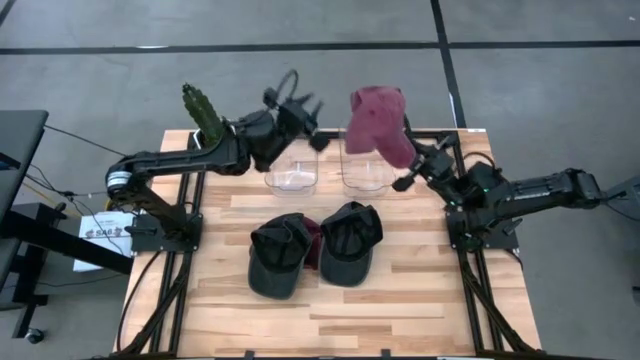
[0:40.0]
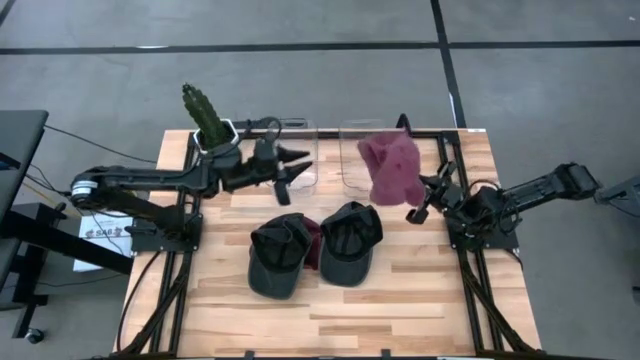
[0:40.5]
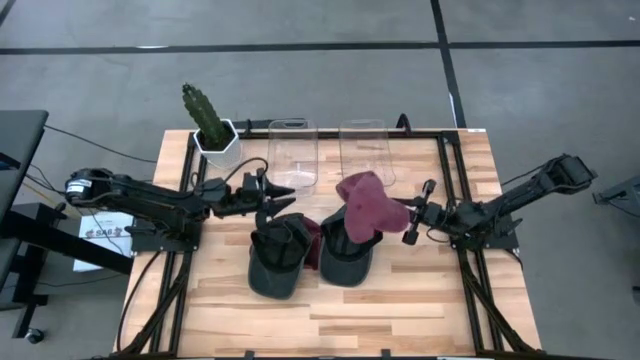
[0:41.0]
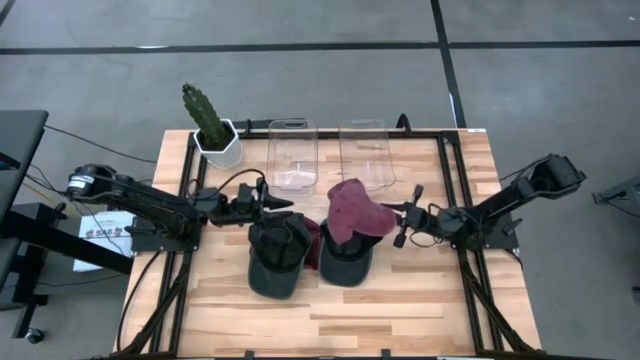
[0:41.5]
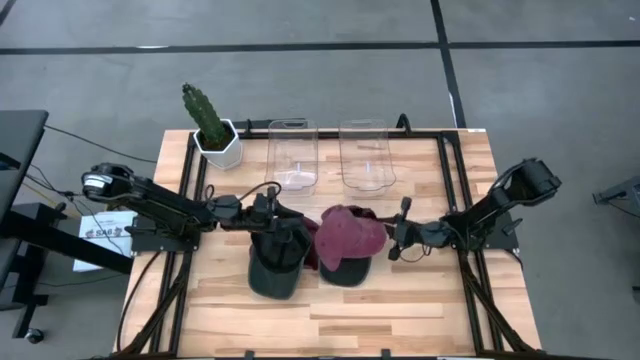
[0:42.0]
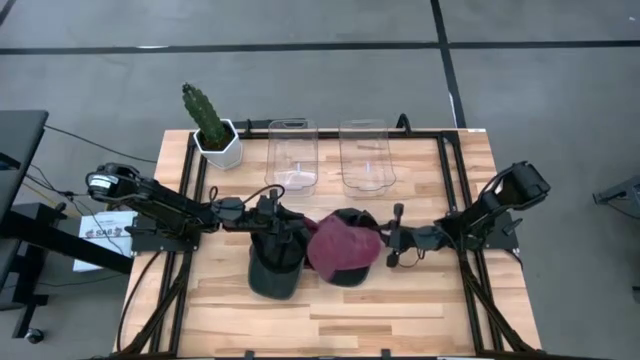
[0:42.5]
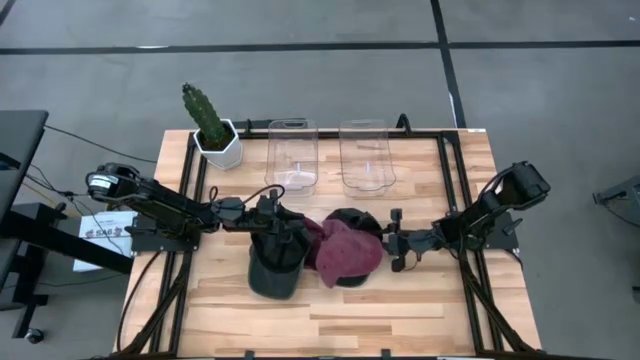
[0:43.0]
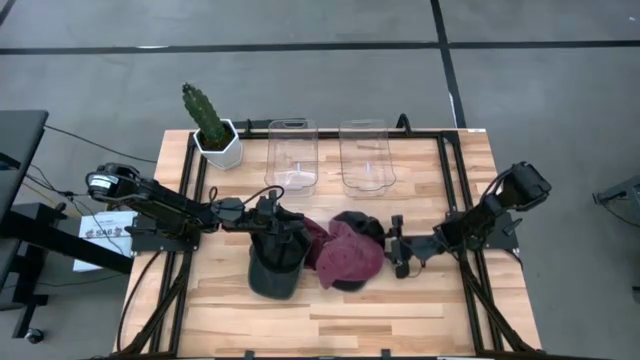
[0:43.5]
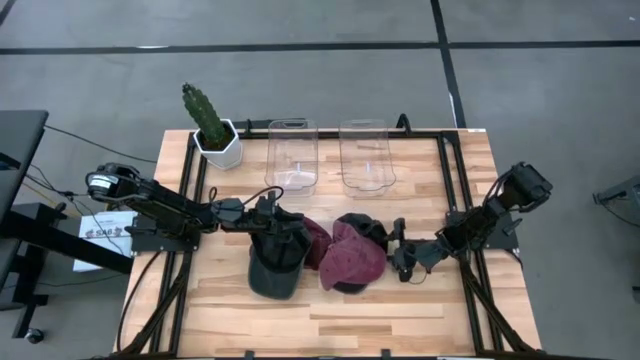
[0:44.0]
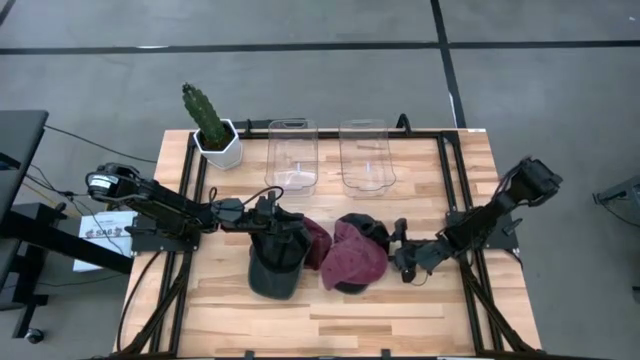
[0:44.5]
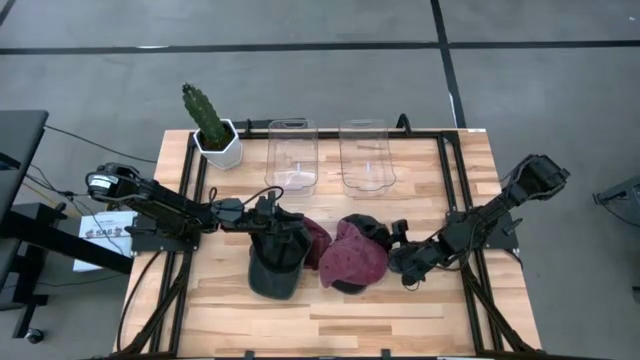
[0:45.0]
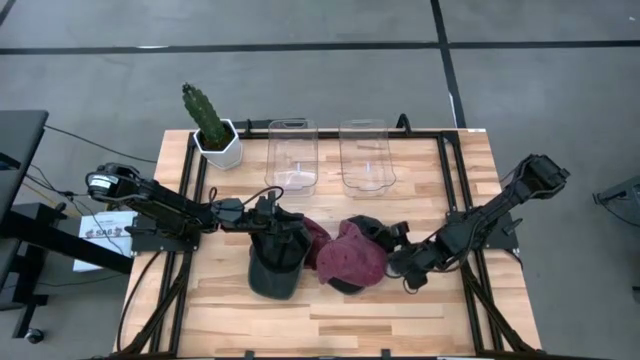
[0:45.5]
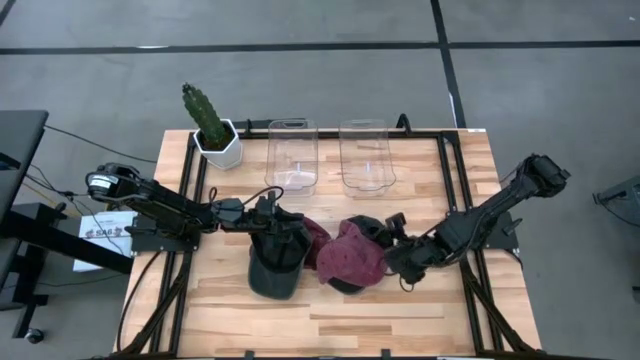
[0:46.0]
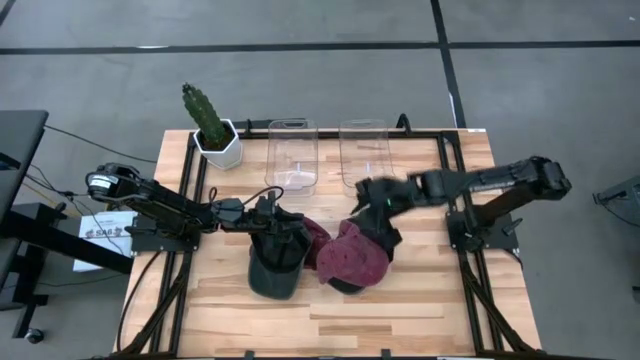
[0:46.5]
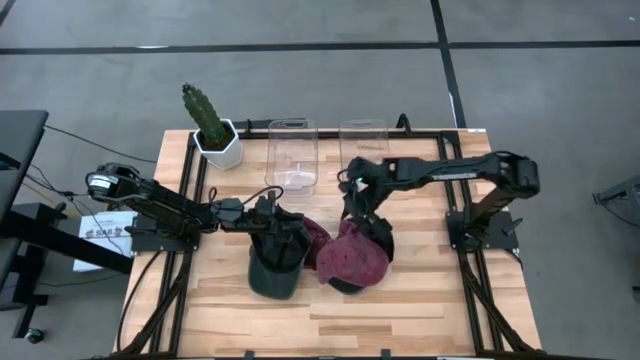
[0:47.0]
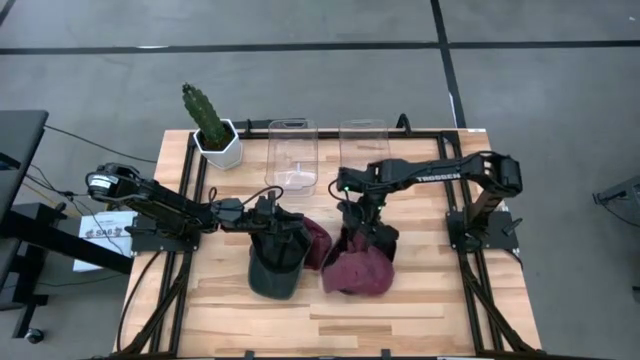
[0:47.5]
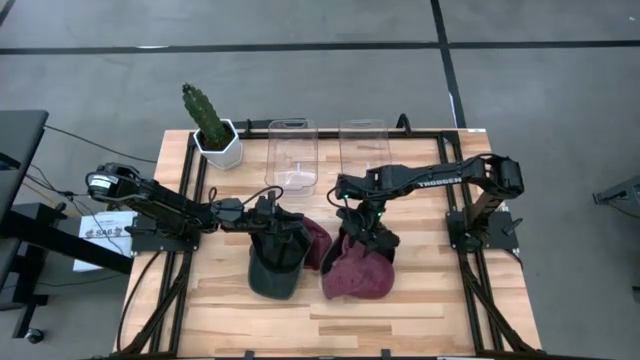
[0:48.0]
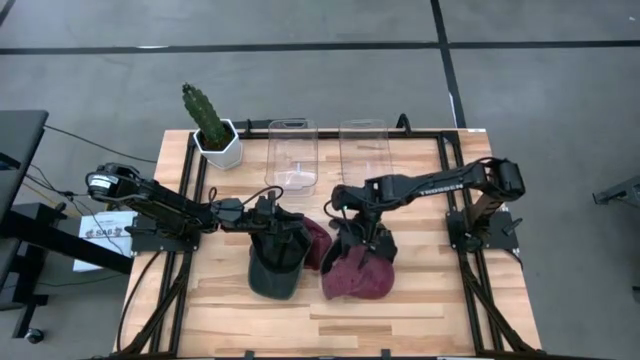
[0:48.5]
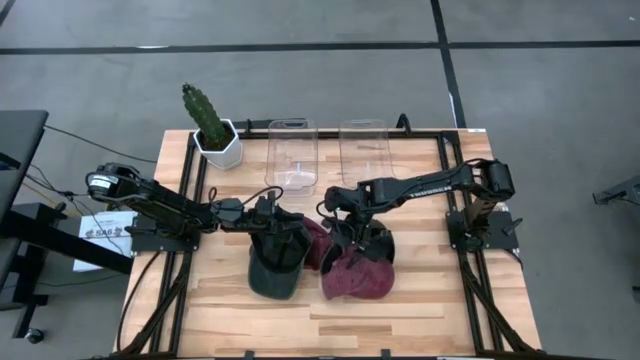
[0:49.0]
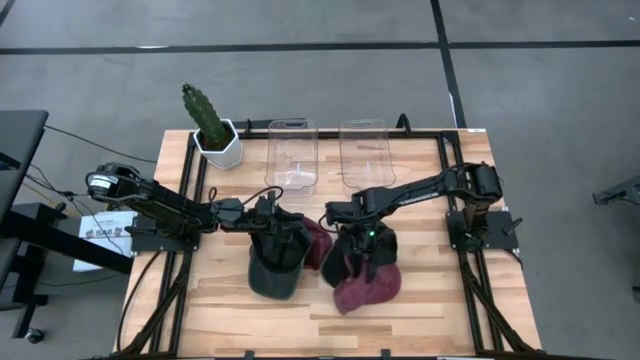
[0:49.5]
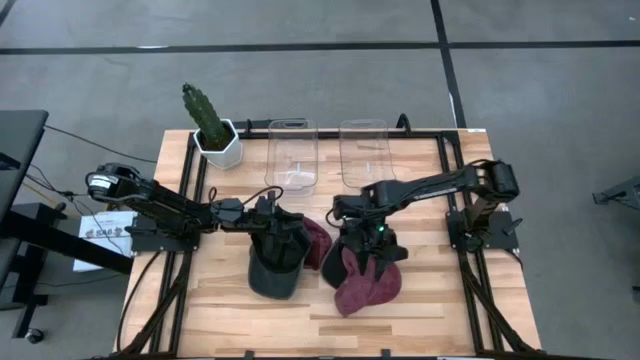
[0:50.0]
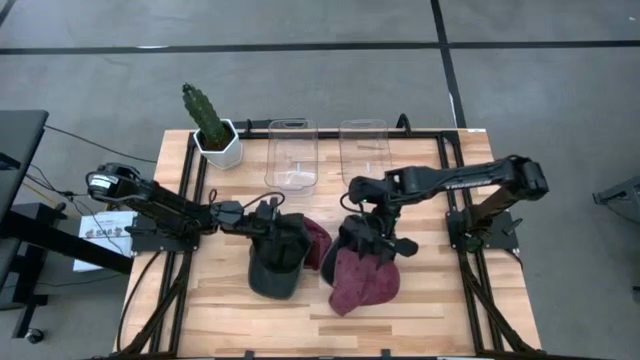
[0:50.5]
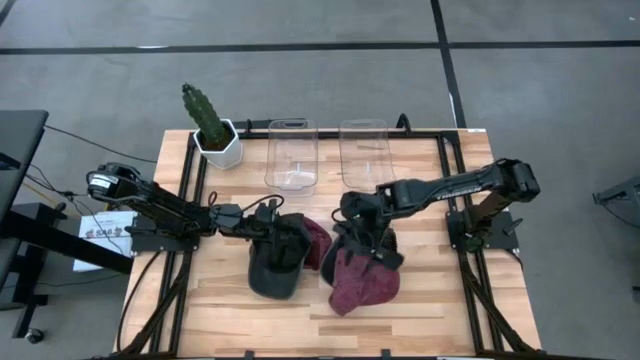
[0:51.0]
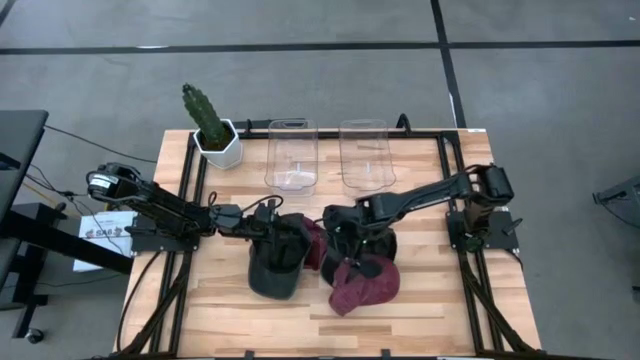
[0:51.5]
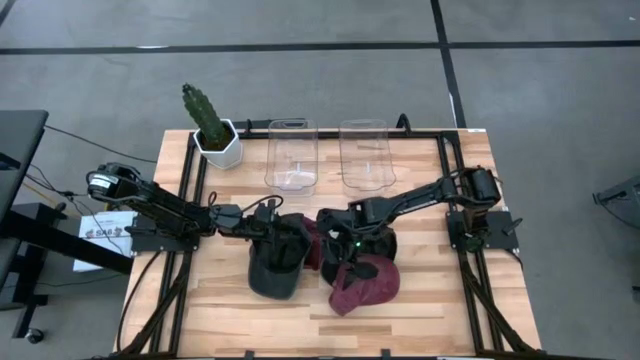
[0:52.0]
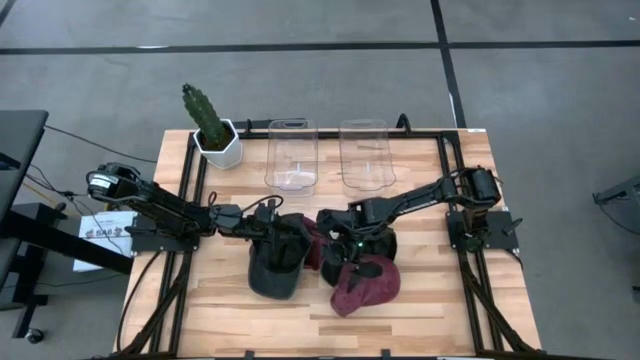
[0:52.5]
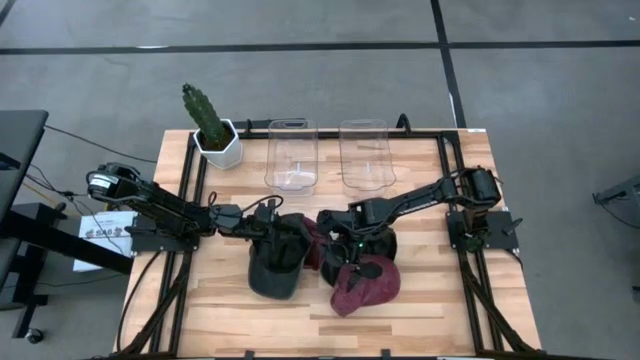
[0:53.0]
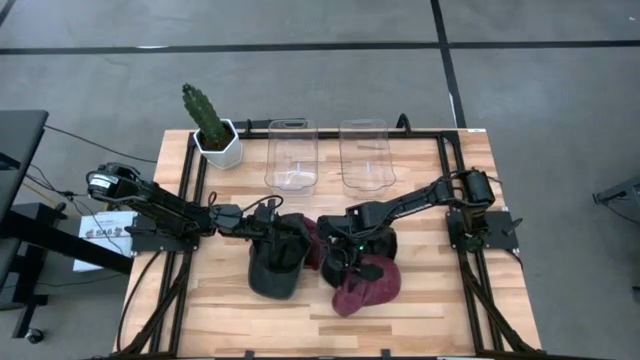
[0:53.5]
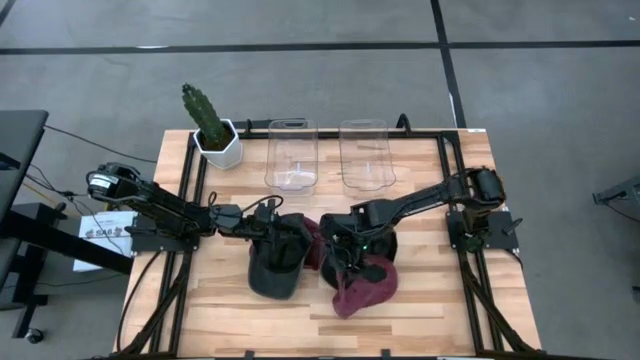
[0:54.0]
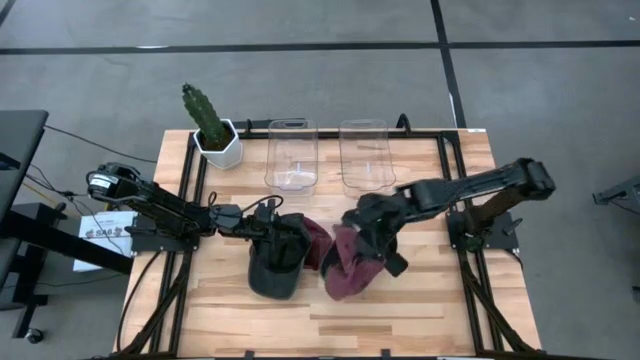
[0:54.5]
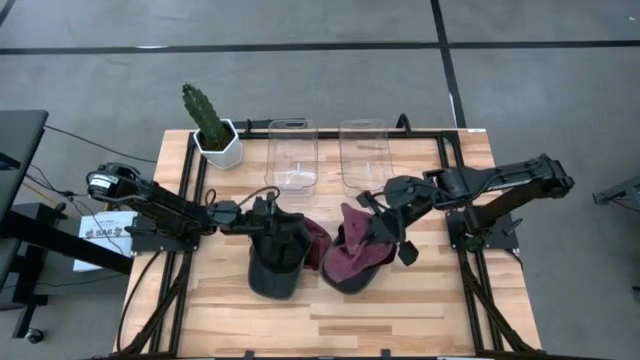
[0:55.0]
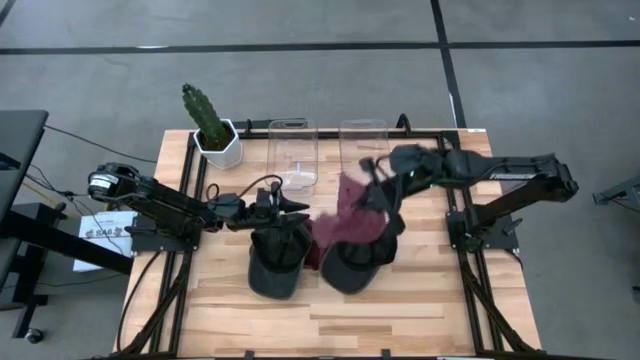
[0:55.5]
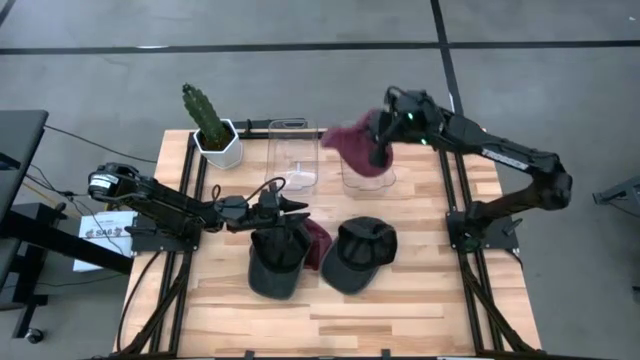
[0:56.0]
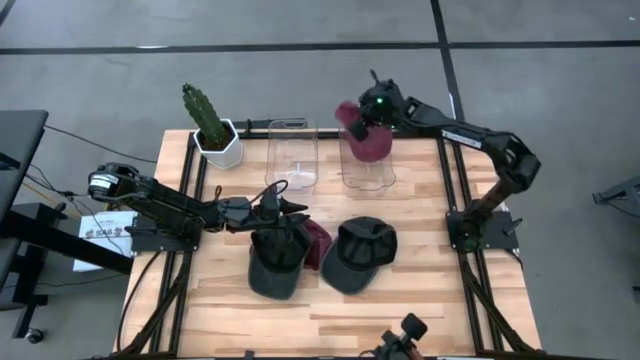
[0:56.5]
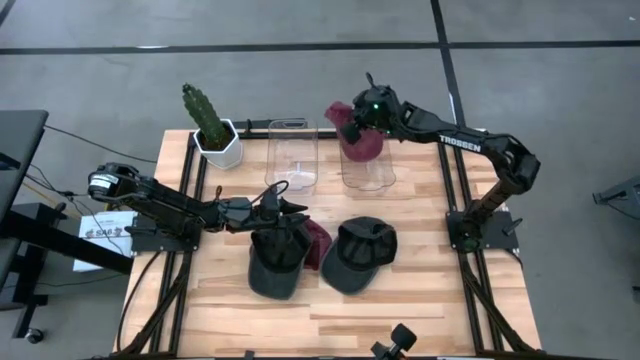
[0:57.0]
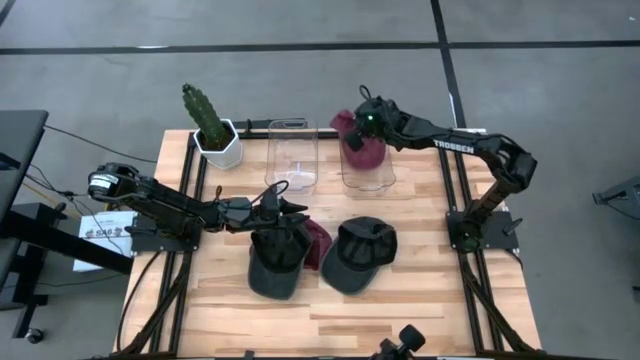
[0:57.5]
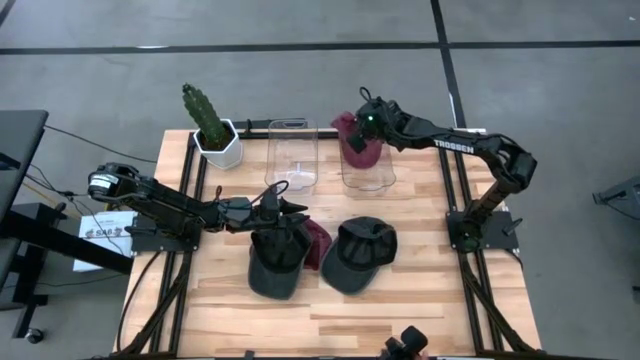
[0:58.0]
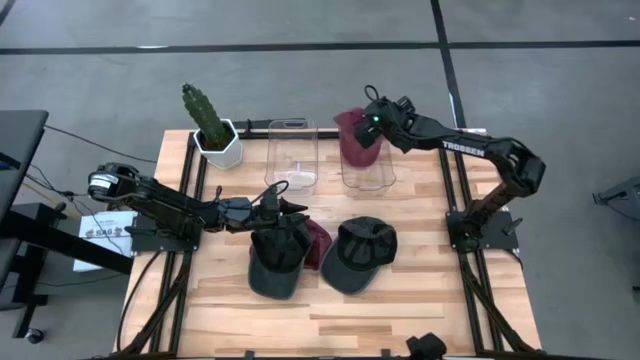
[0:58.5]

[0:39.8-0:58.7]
Task: Pick & Place hat
Put the right red cap into the right transparent bin
